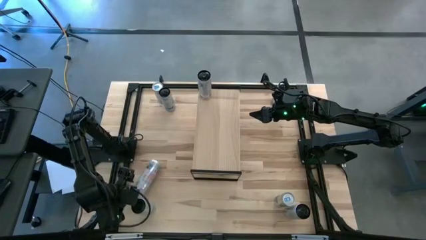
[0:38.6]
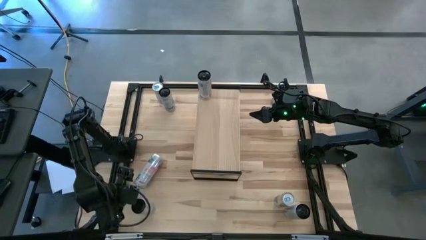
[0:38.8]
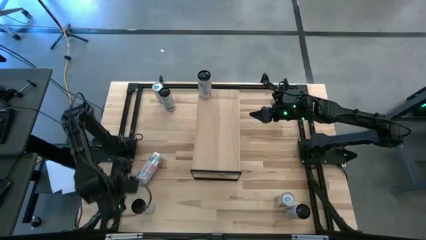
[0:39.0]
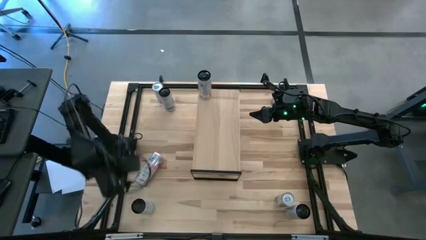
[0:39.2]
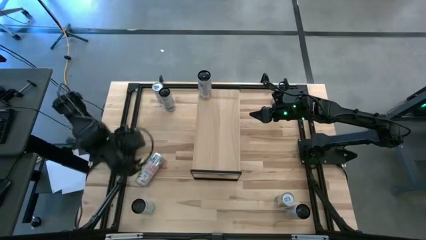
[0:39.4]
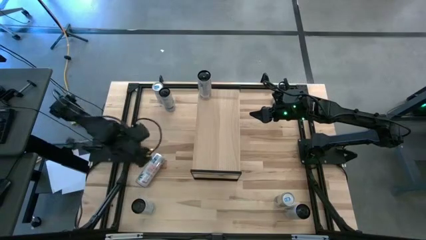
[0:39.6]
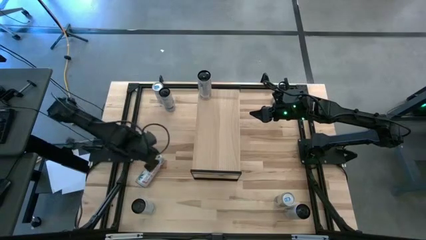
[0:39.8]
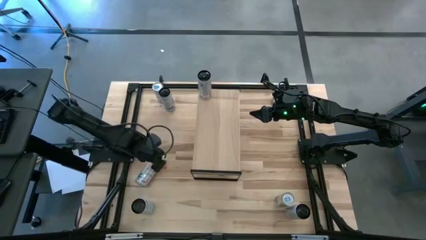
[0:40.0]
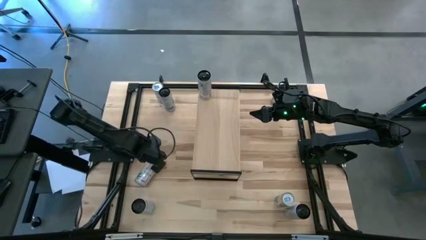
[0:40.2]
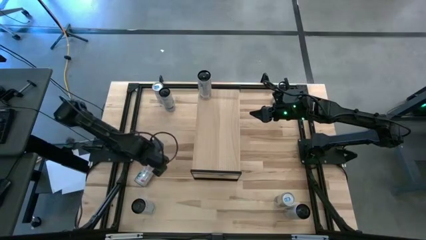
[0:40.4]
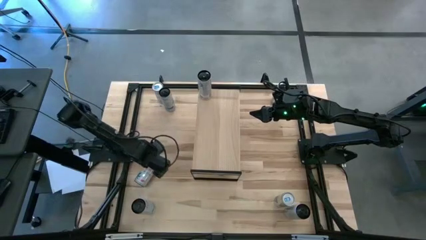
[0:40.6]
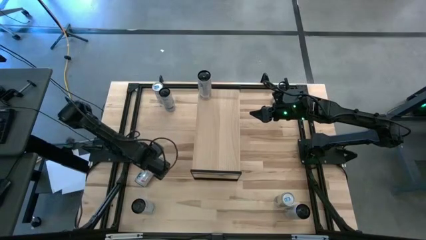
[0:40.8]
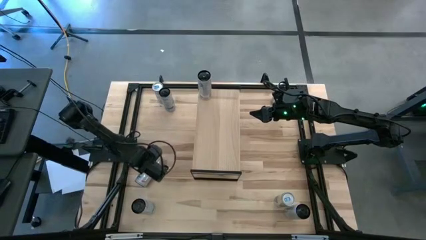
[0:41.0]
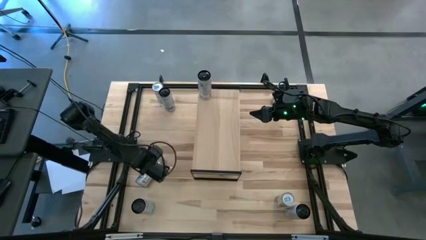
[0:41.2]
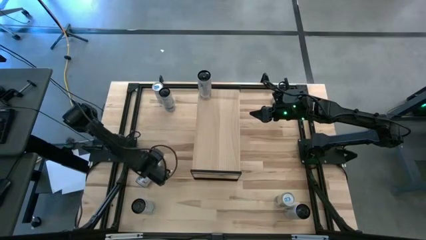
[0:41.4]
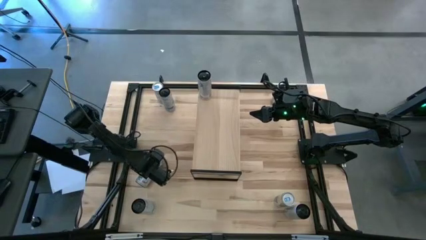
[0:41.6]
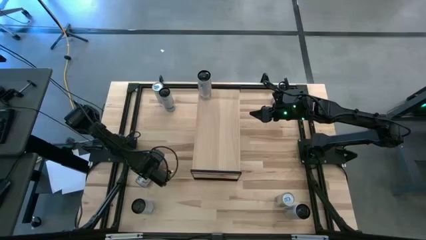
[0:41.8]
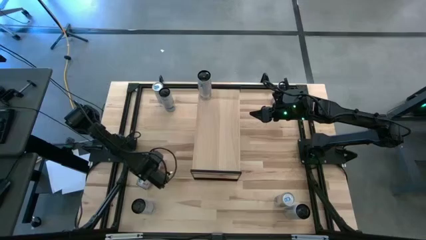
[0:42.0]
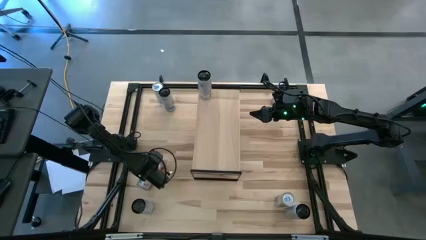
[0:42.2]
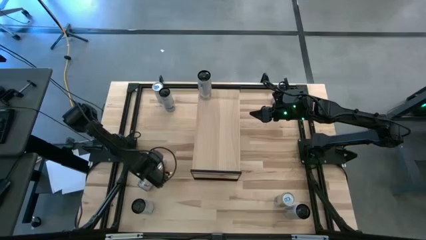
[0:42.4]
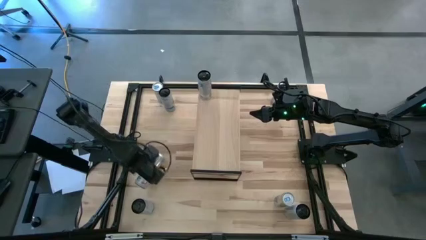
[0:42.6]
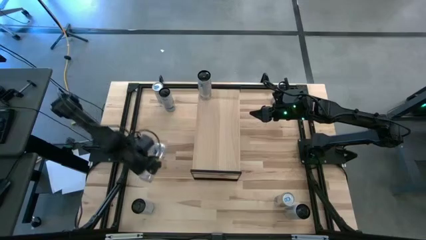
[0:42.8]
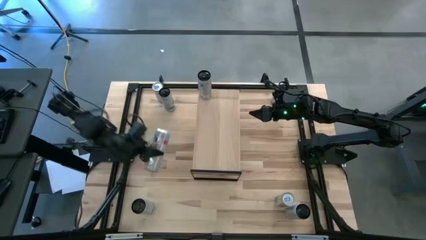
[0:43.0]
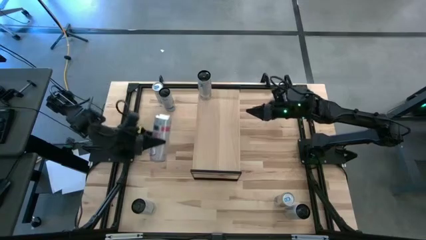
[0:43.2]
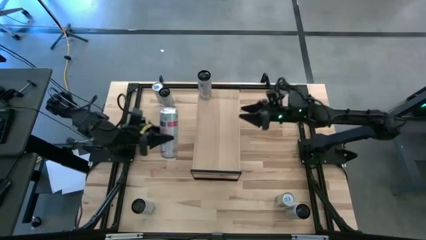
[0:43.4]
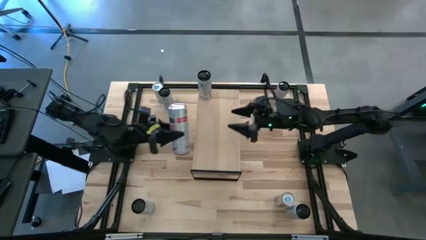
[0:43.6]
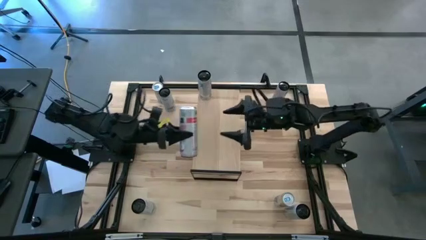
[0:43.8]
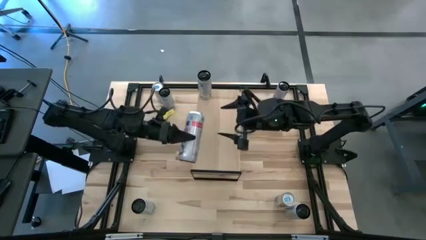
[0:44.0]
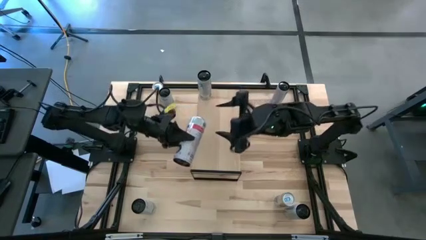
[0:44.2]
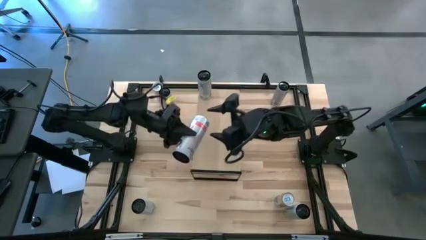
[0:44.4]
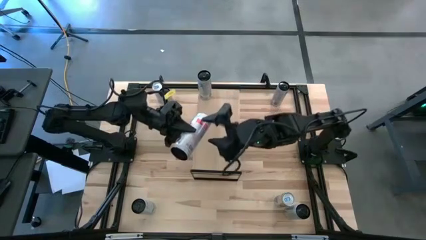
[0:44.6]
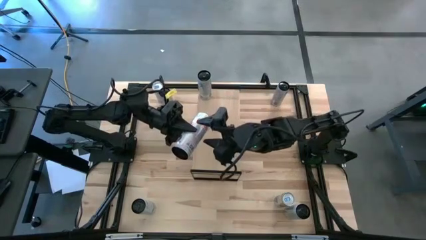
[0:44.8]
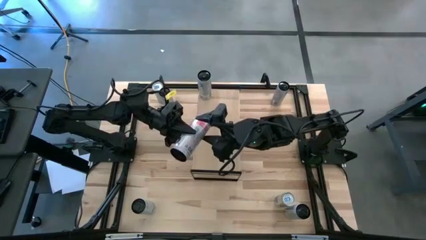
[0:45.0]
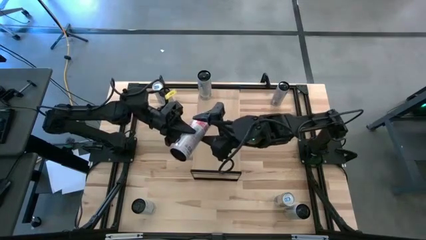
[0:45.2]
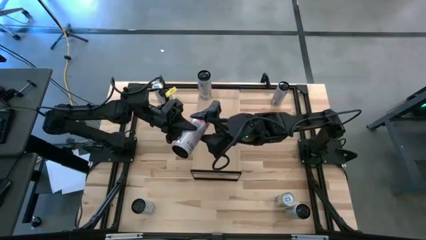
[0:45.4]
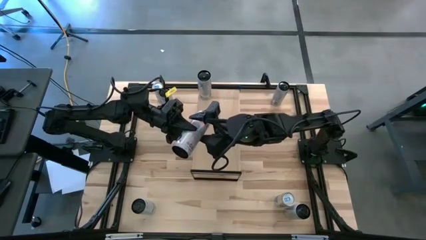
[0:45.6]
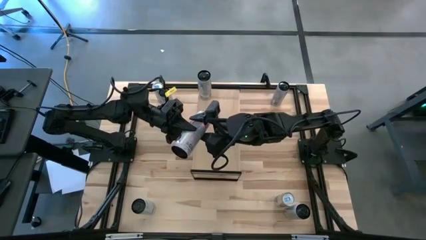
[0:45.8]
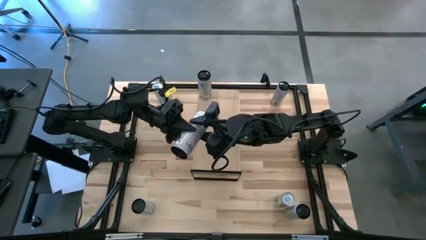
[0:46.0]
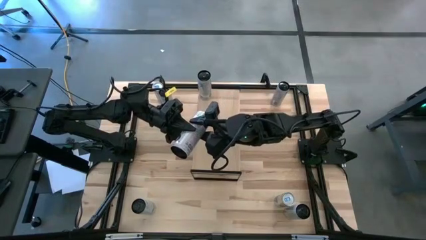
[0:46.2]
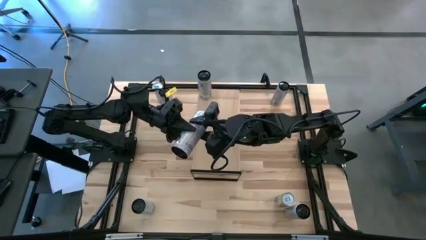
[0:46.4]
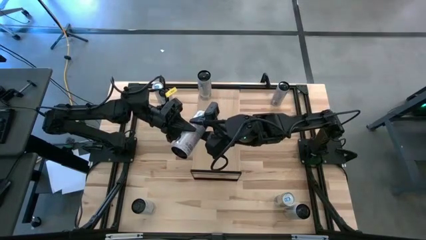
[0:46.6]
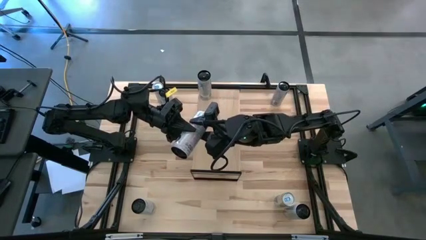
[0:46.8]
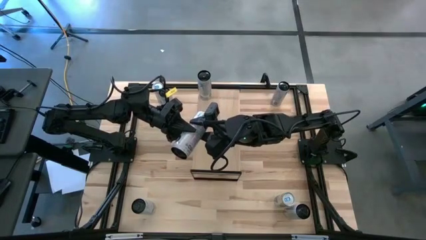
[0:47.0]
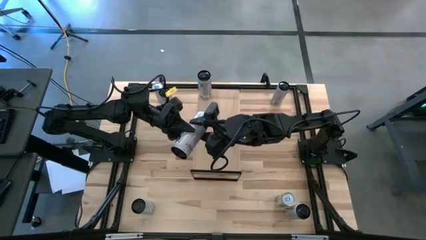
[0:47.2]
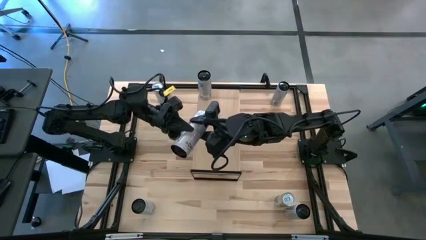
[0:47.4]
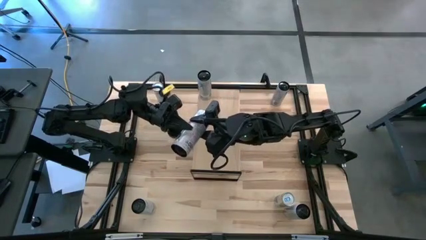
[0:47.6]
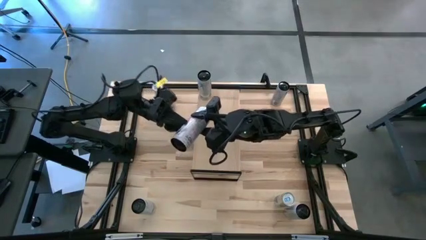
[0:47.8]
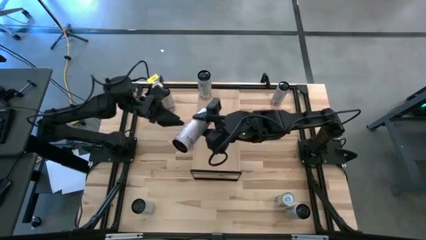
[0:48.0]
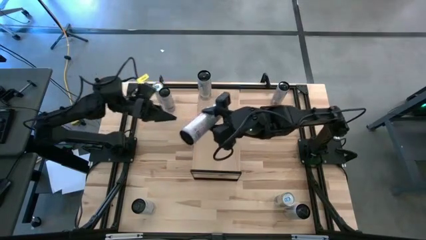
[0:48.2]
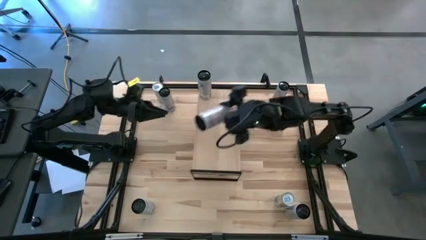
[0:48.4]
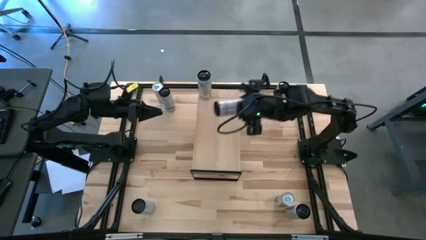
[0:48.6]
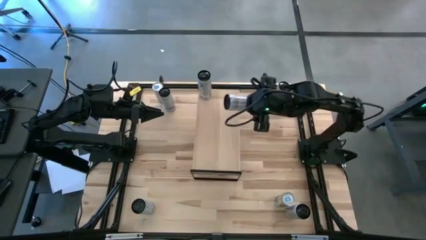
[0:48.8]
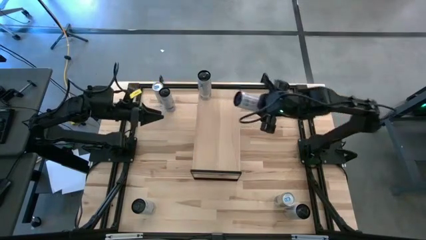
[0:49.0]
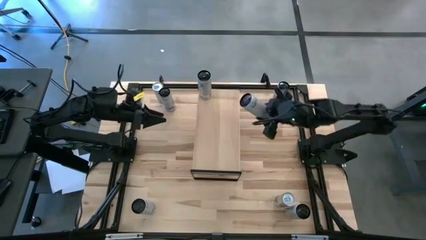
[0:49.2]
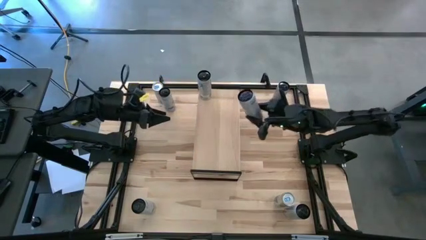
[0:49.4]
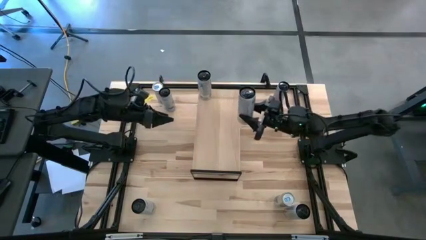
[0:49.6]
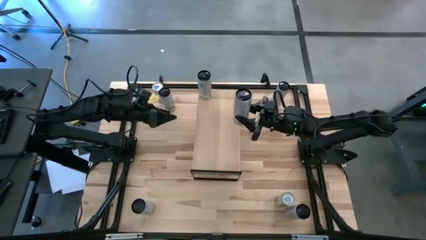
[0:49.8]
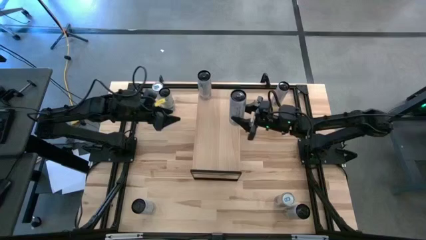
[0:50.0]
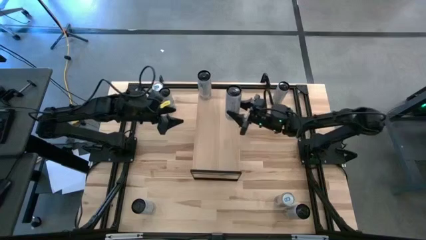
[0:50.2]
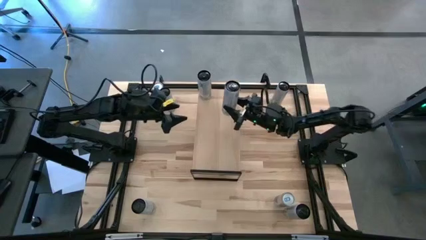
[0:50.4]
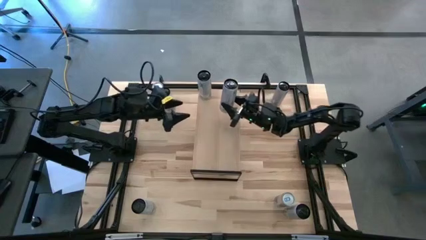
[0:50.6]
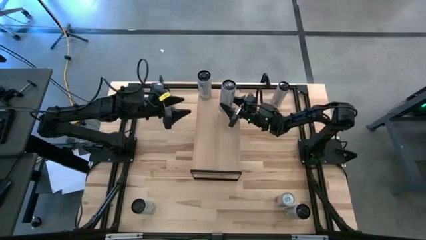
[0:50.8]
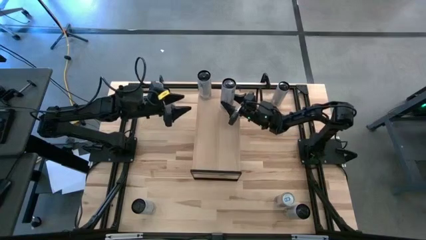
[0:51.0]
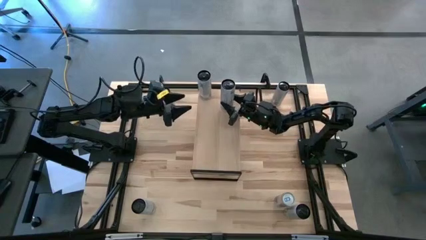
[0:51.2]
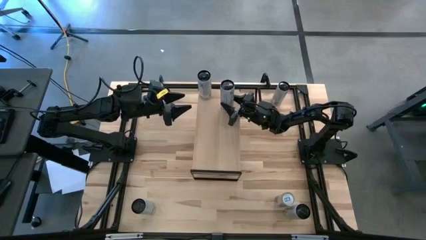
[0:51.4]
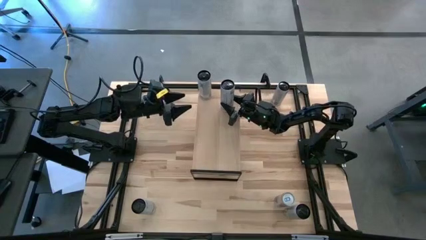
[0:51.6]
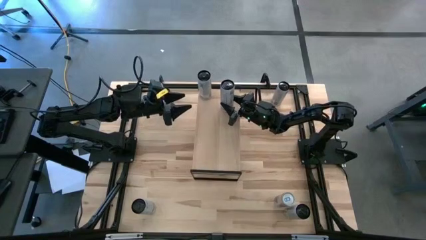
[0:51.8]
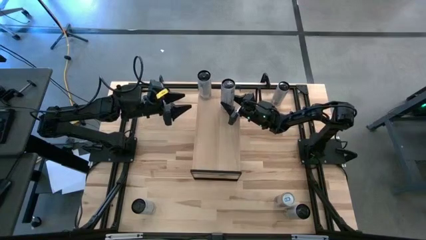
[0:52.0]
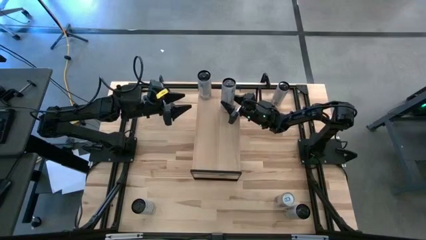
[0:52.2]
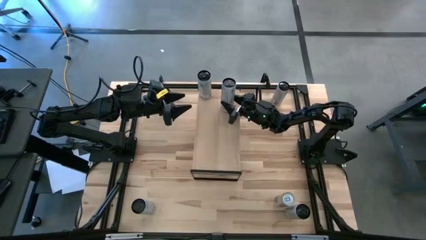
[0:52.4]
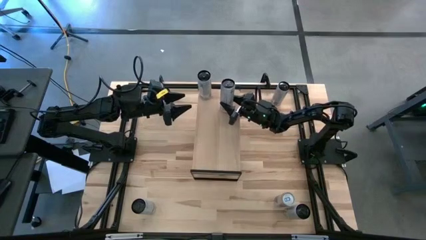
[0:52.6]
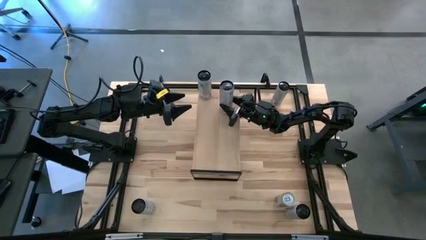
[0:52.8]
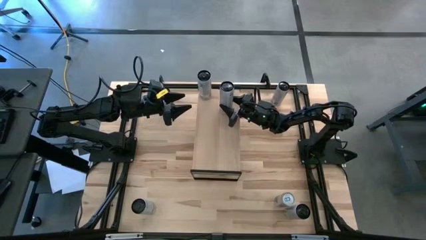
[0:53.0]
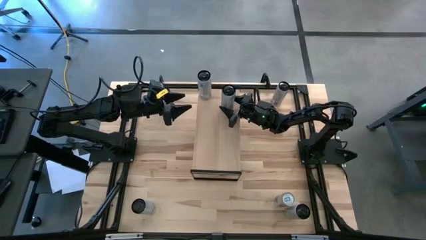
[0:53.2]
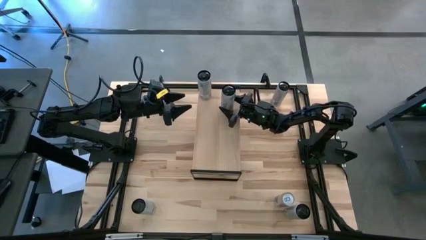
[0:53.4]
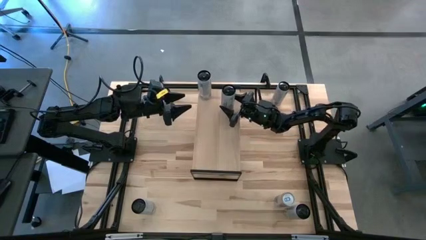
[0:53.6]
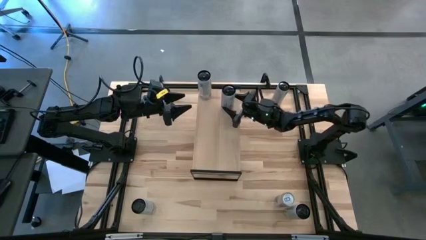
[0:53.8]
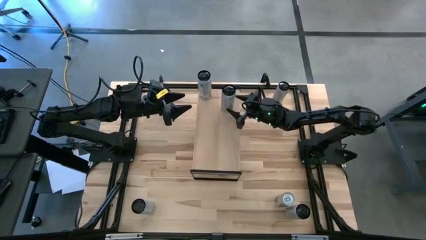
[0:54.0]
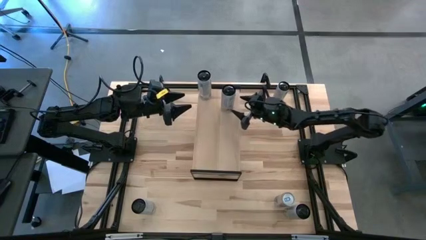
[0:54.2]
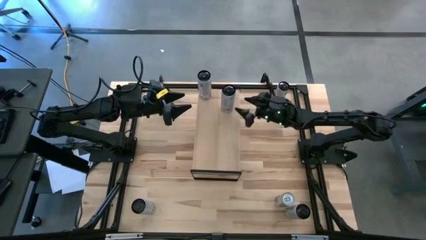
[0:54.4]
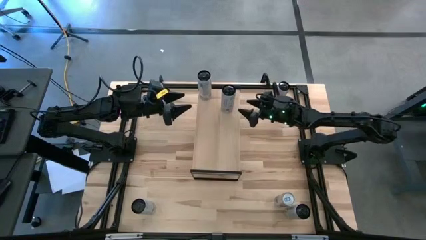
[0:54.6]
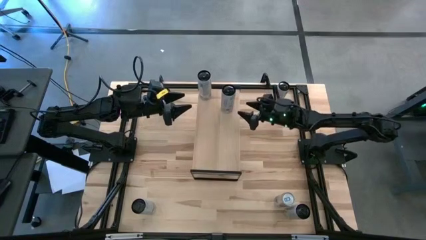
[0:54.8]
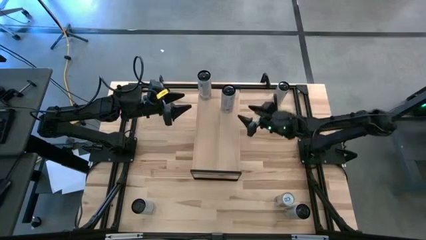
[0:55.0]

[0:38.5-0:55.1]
Task: Place canned beverage on shelf
Put the white pink soda can on the shelf aligned with the white pink soda can
